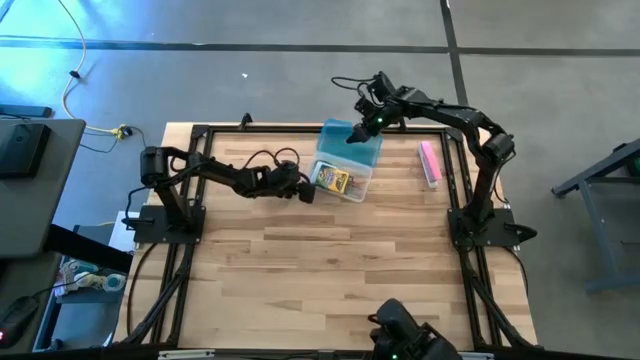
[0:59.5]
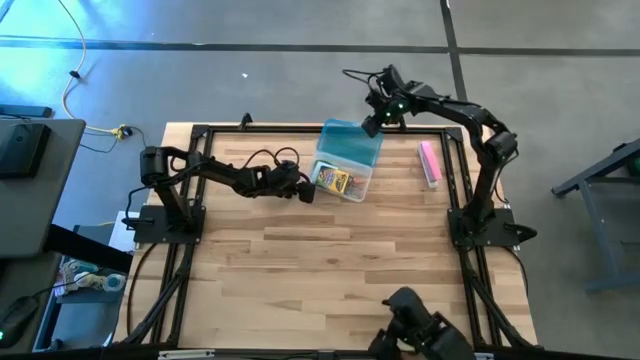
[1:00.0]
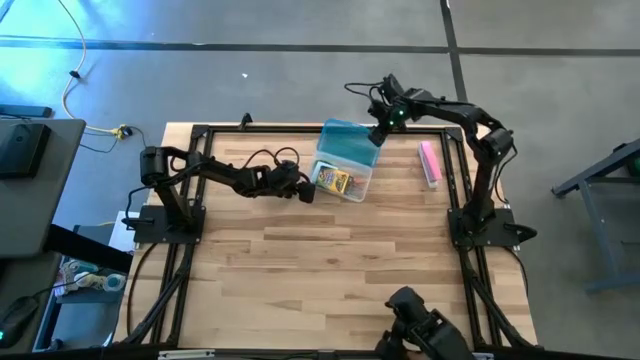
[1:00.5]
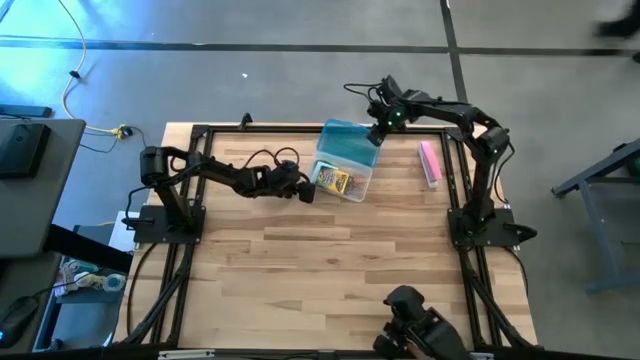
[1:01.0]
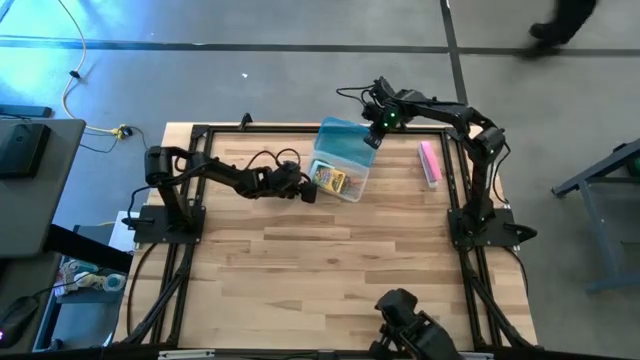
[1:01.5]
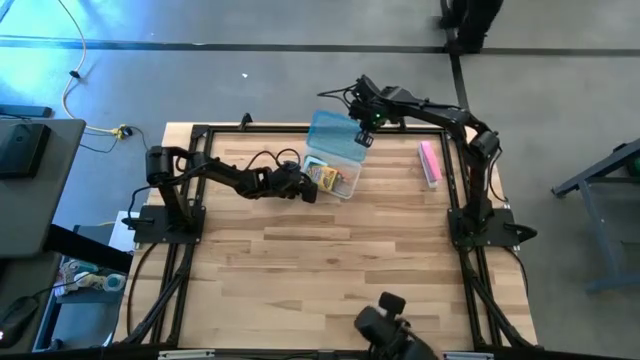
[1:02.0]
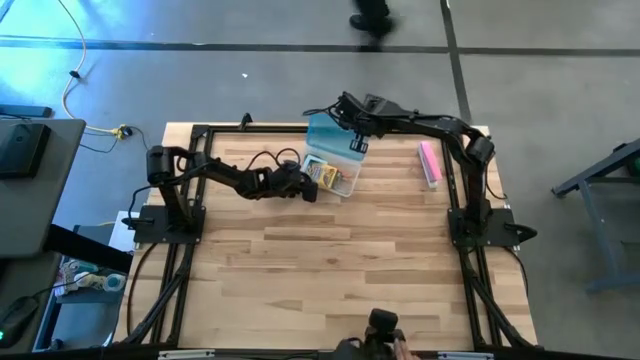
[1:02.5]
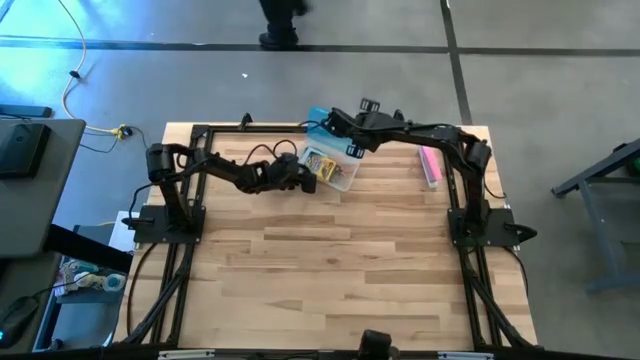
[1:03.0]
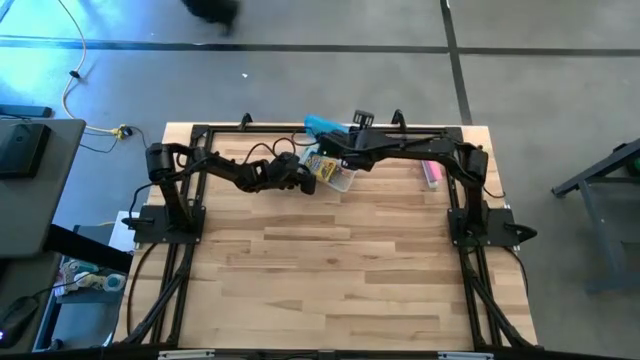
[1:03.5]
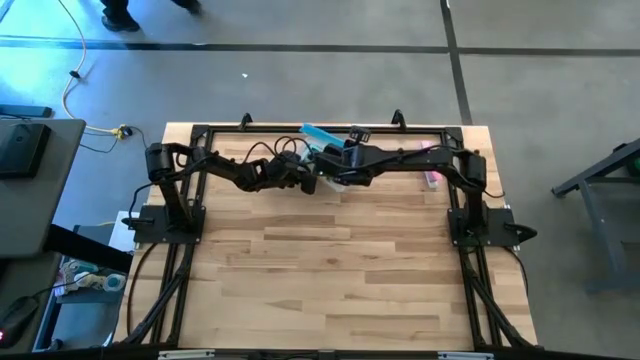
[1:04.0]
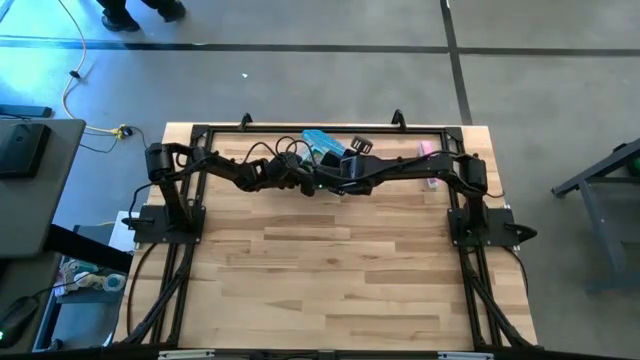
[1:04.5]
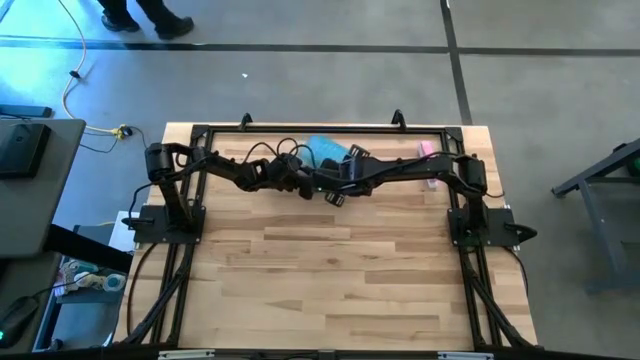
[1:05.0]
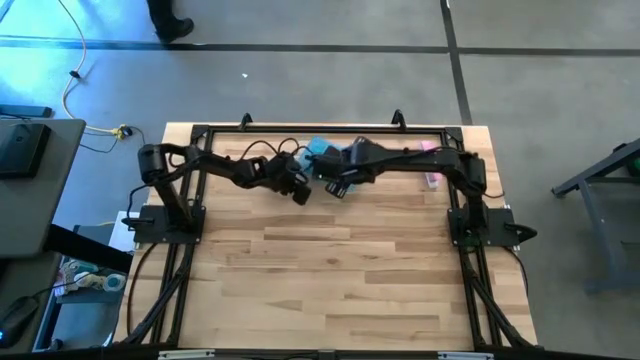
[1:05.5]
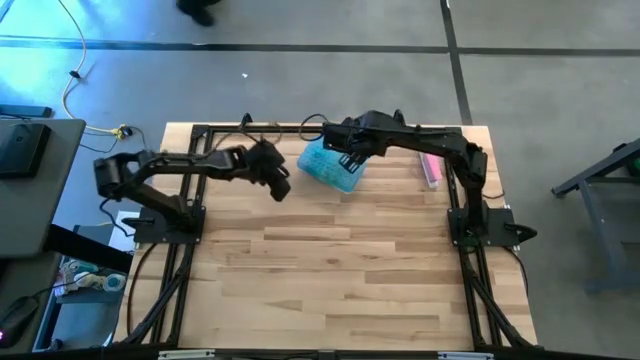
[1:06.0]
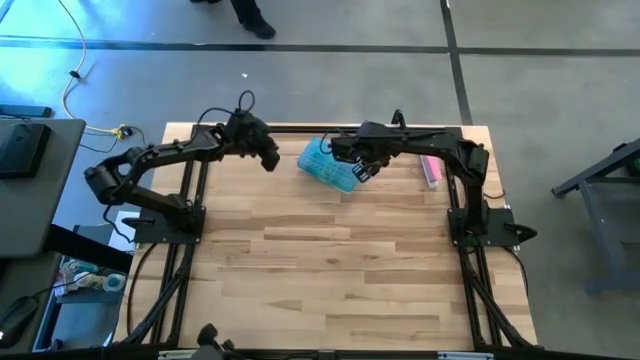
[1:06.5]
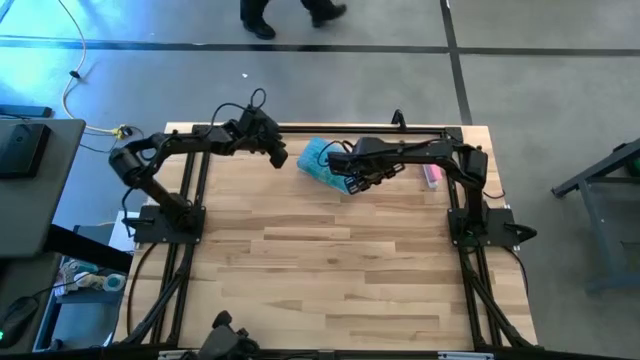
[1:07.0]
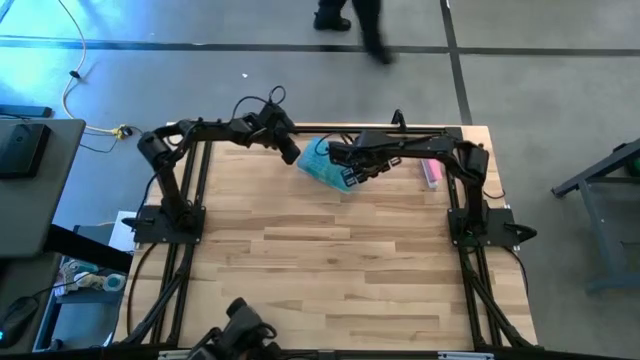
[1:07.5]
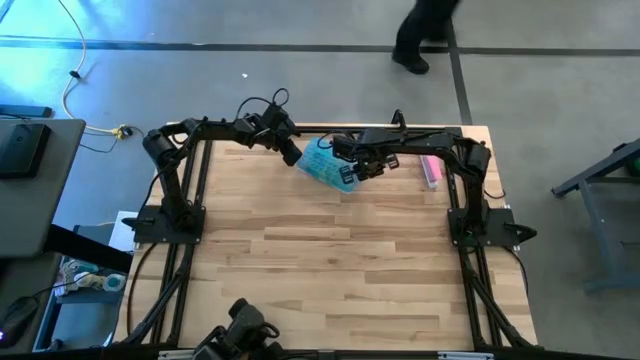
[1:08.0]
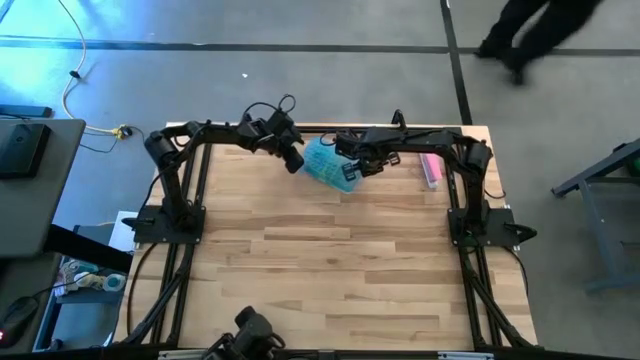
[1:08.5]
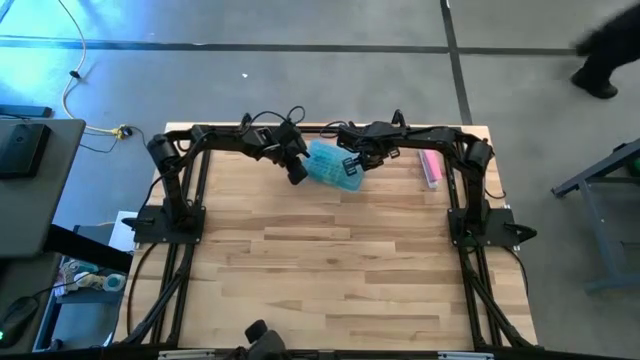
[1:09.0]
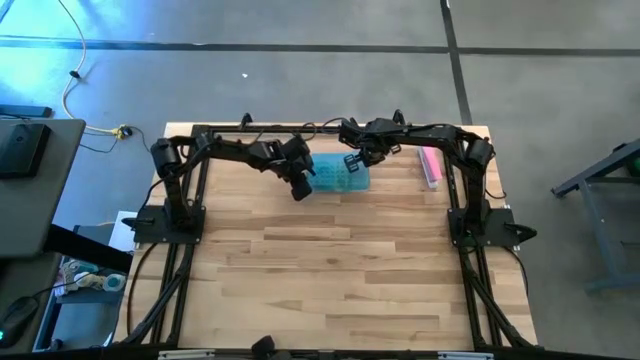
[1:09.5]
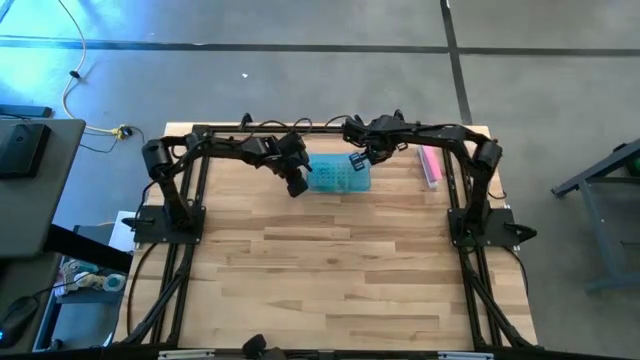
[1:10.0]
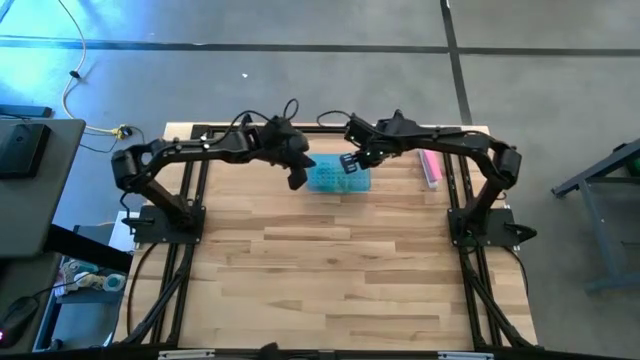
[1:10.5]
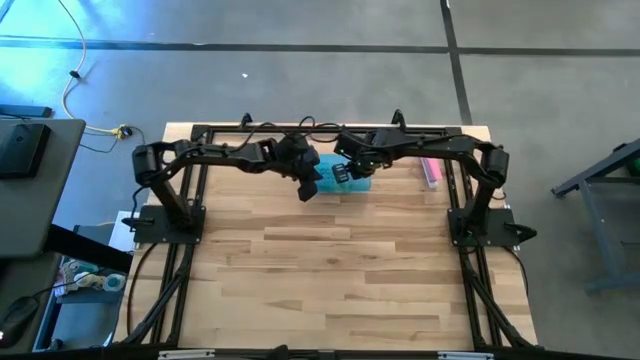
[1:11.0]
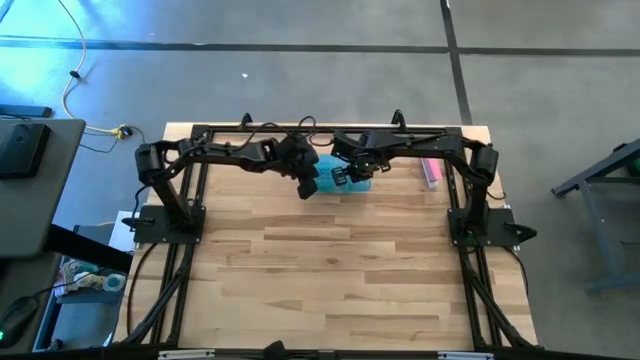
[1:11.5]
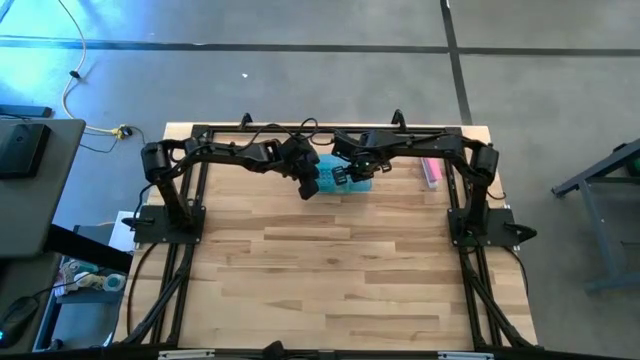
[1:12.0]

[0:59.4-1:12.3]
Task: Pack school essentials
Close the supply box

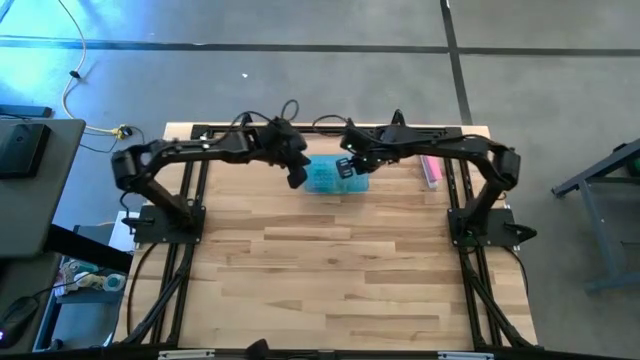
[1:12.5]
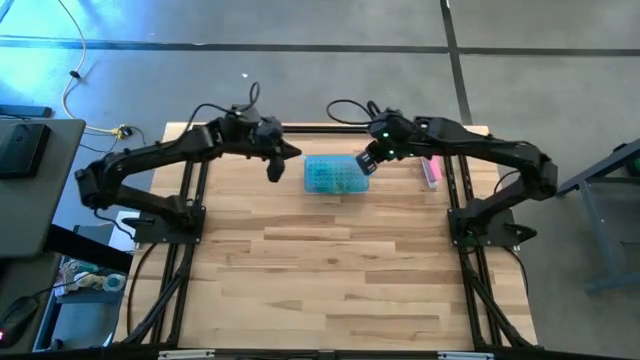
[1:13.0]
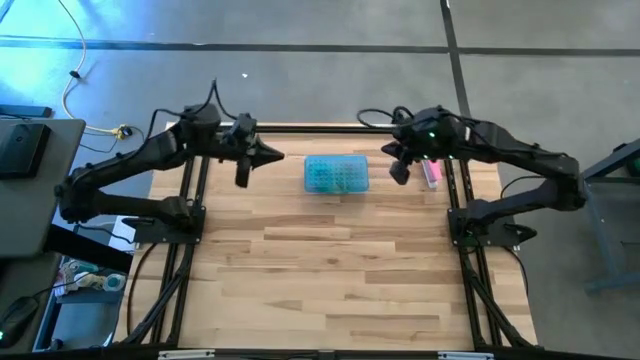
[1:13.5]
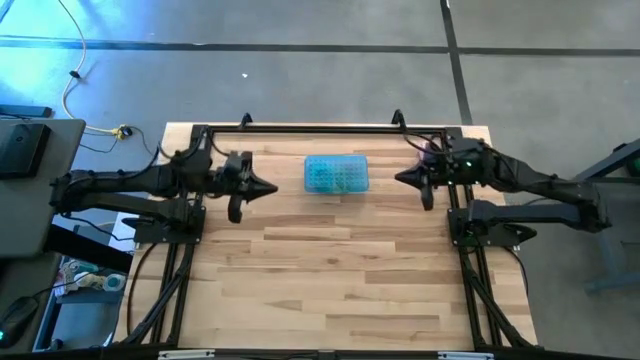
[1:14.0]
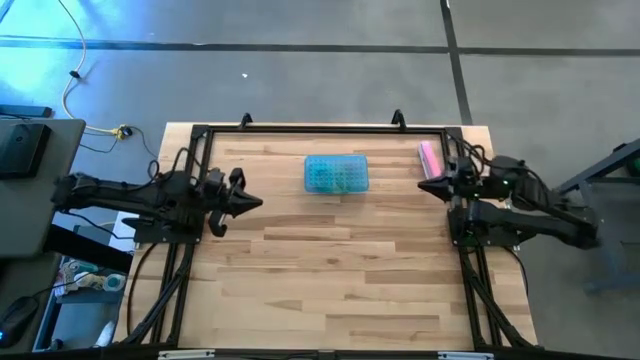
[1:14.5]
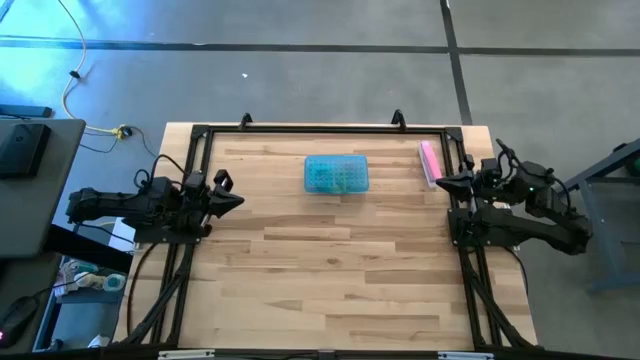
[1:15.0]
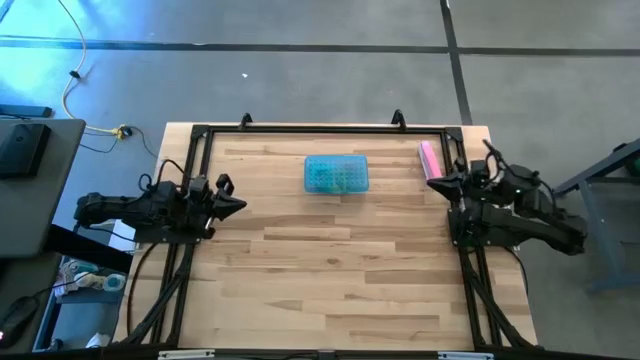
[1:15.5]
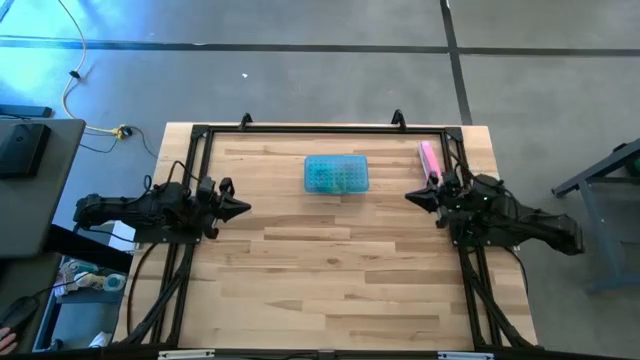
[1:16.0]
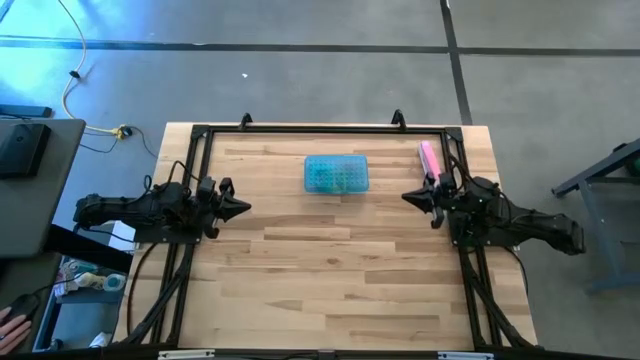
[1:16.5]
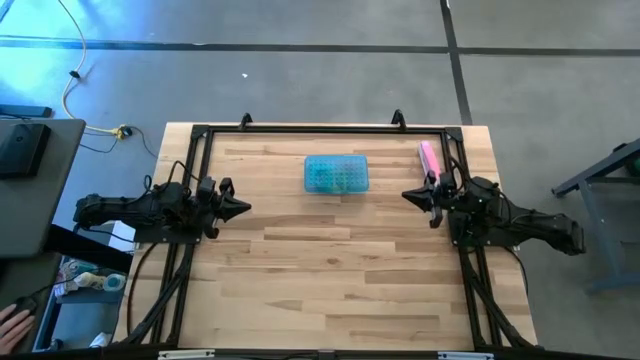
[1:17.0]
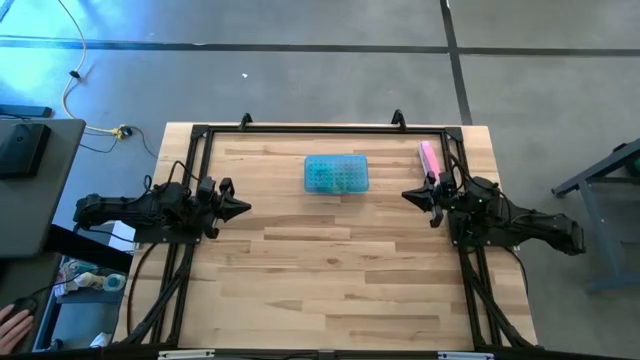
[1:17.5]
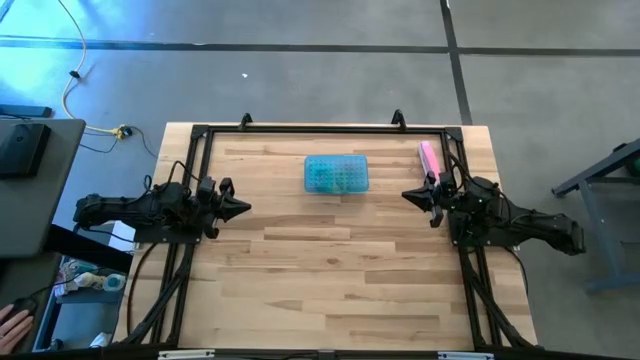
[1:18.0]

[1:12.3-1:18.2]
Return to Home Position

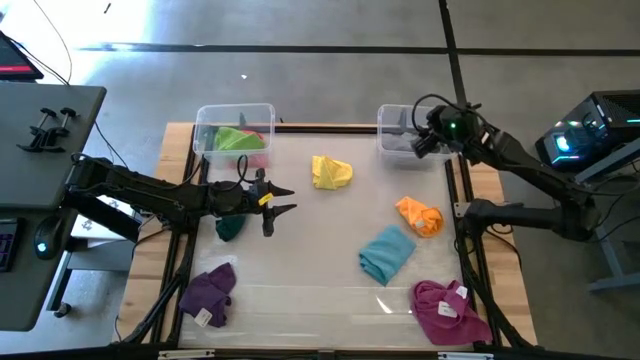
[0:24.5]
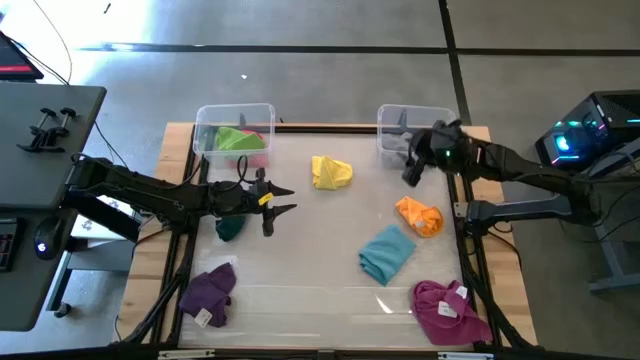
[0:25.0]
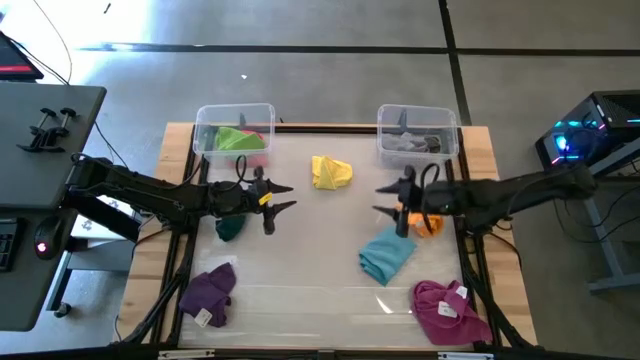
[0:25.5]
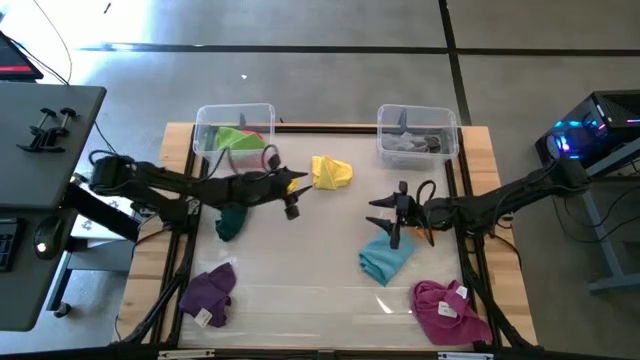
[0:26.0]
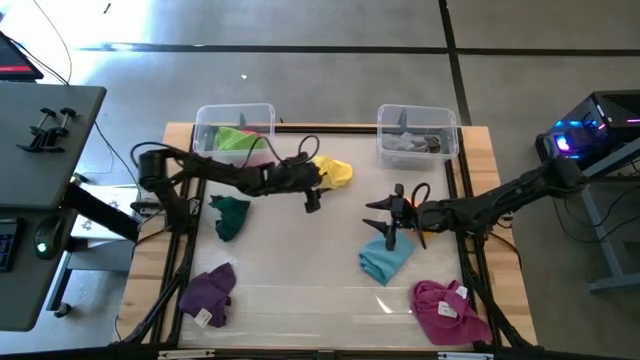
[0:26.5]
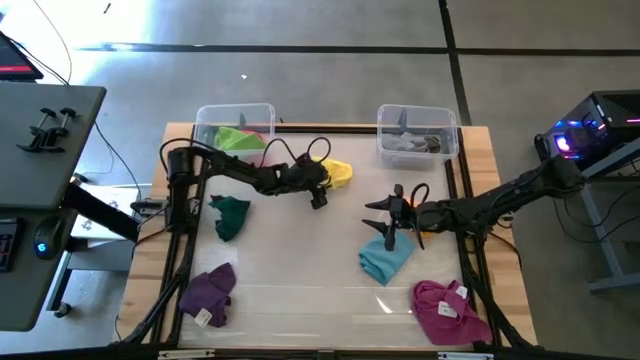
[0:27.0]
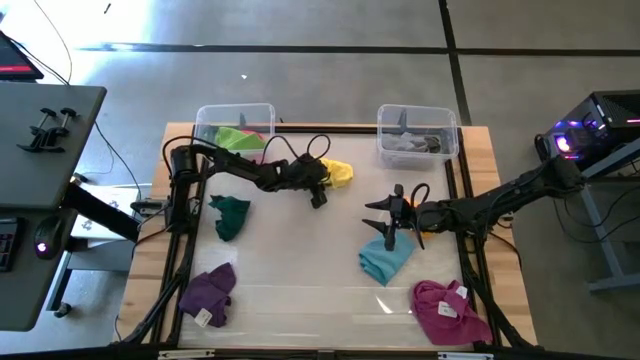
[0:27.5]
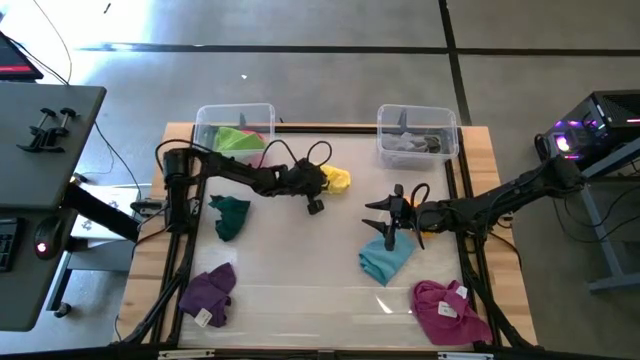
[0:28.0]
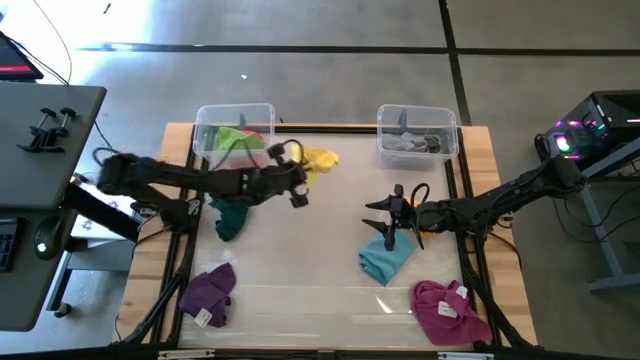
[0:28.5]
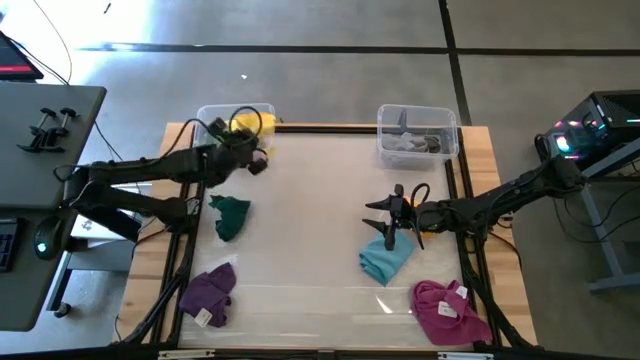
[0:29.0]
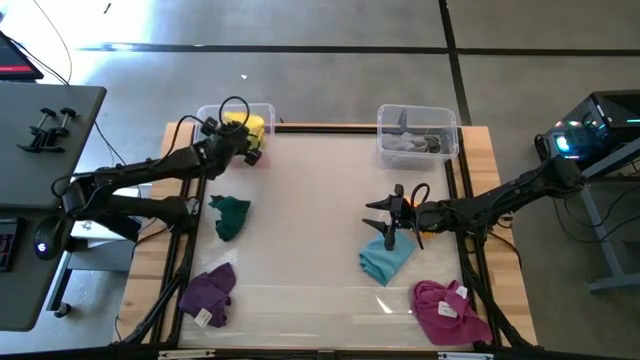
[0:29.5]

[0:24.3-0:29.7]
Task: Sort towels by color in basket
Put the yellow microfiber cloth into the left transparent bin
